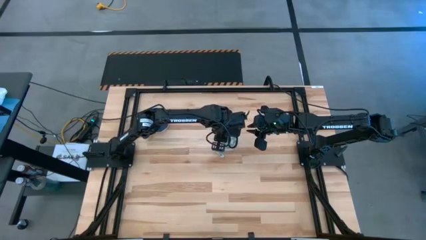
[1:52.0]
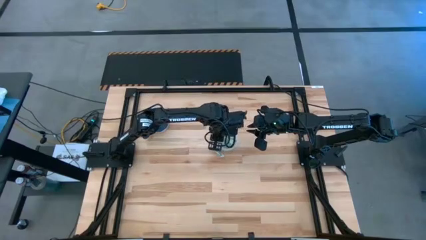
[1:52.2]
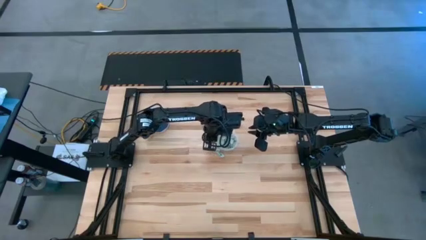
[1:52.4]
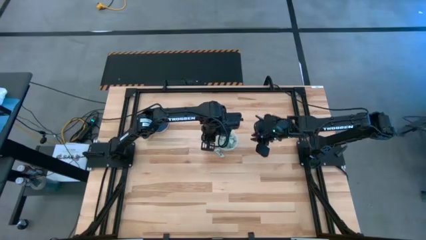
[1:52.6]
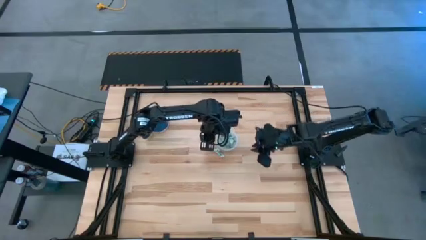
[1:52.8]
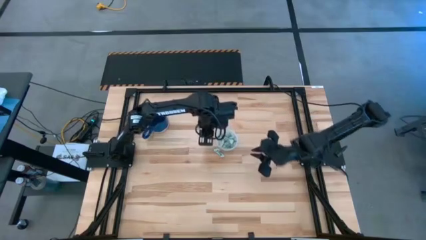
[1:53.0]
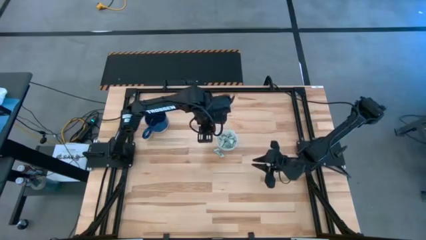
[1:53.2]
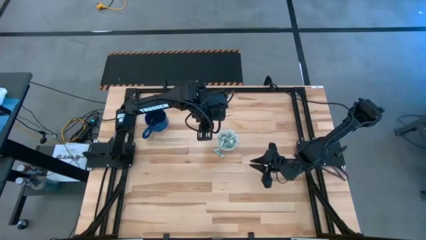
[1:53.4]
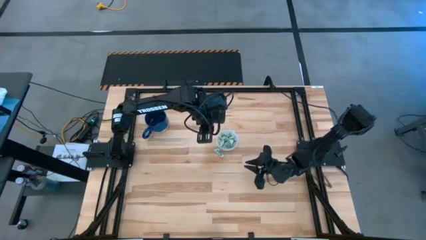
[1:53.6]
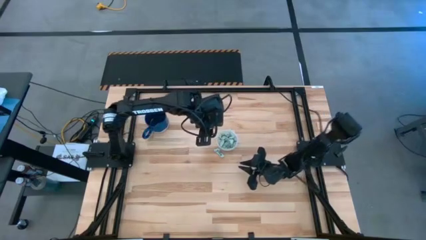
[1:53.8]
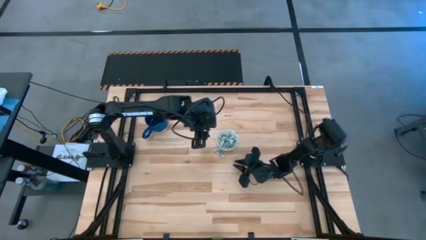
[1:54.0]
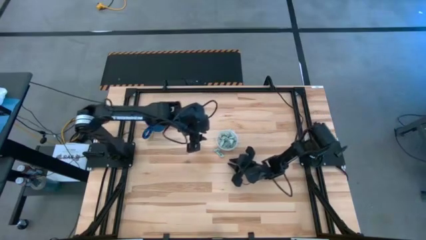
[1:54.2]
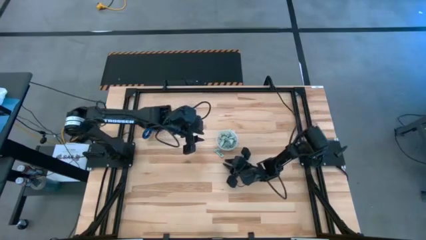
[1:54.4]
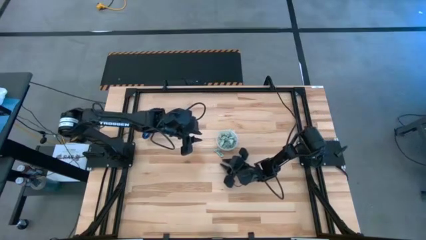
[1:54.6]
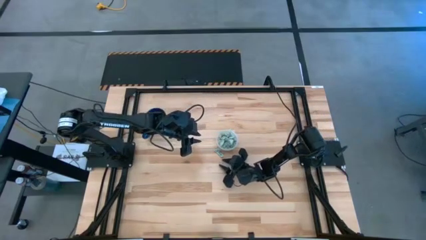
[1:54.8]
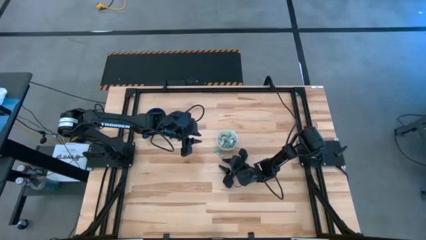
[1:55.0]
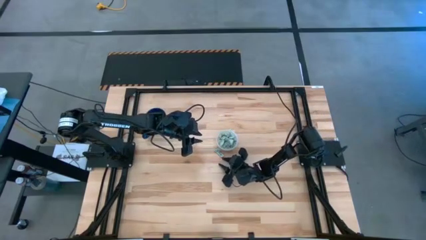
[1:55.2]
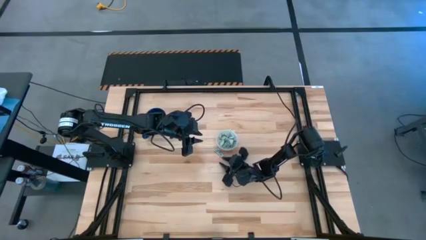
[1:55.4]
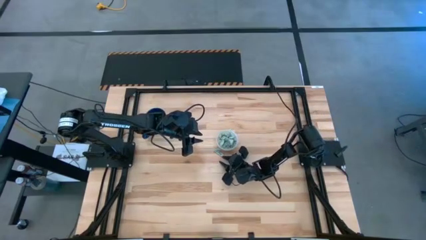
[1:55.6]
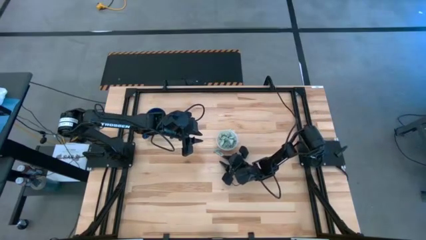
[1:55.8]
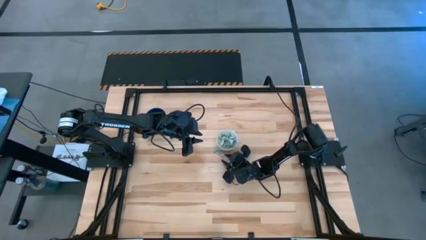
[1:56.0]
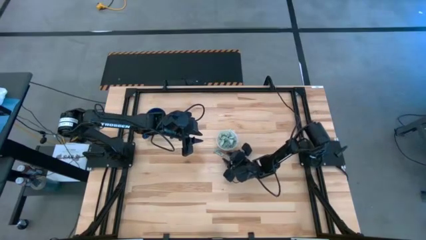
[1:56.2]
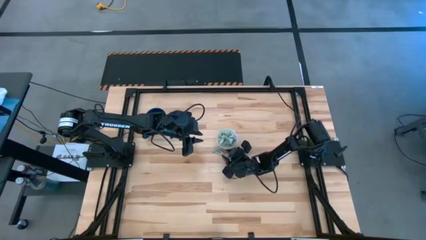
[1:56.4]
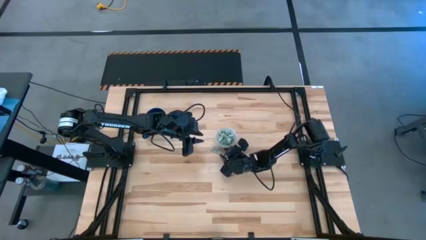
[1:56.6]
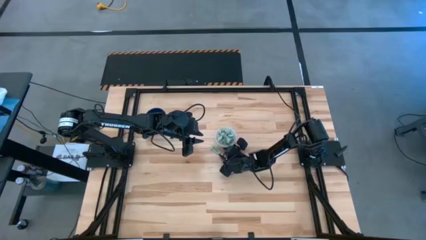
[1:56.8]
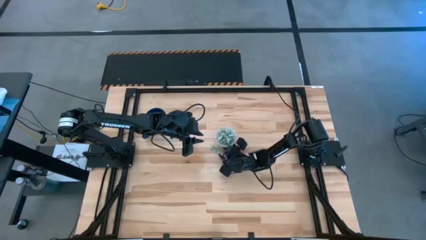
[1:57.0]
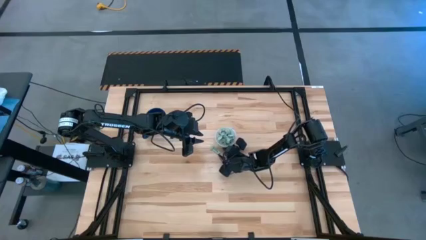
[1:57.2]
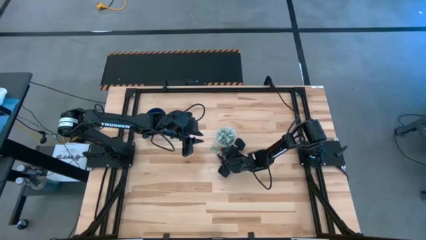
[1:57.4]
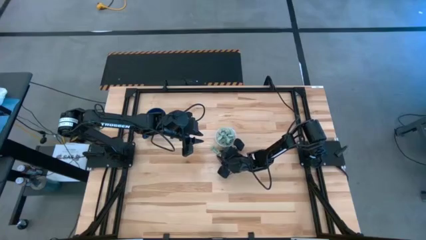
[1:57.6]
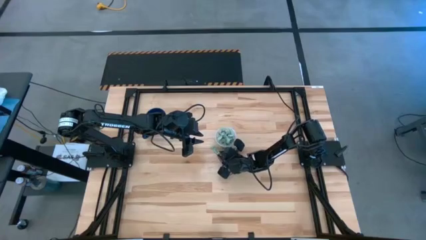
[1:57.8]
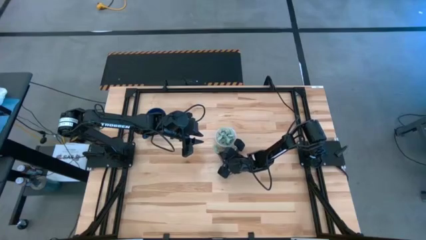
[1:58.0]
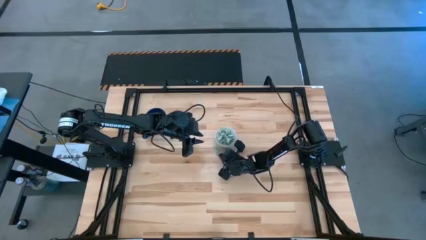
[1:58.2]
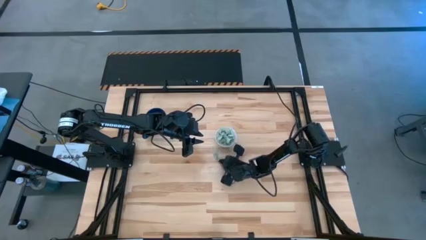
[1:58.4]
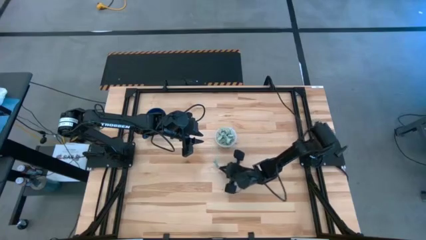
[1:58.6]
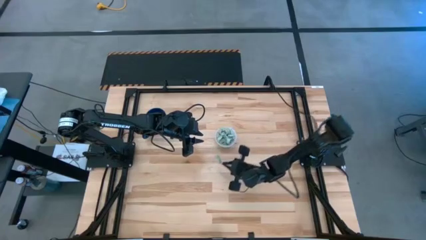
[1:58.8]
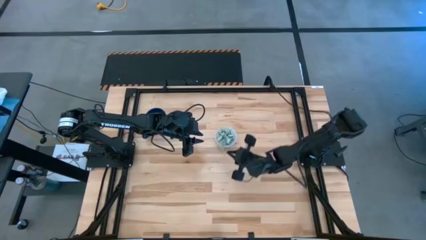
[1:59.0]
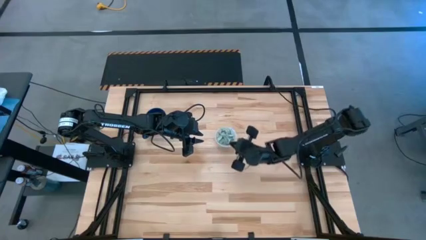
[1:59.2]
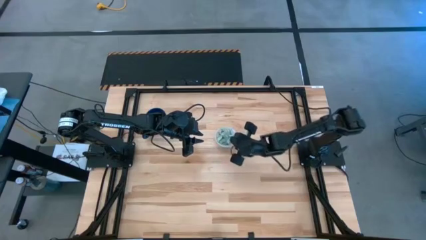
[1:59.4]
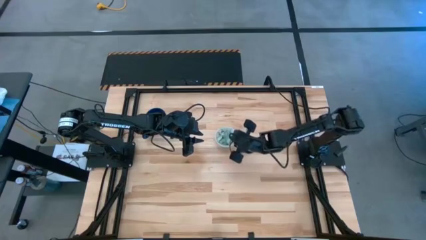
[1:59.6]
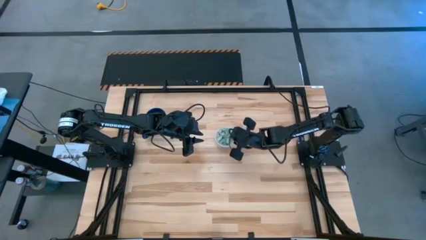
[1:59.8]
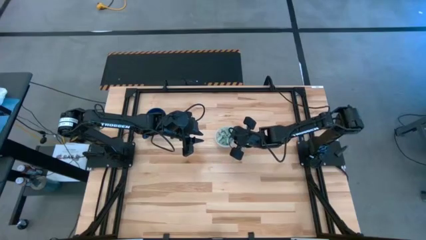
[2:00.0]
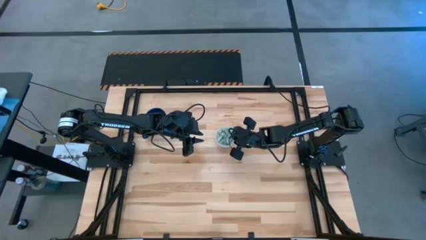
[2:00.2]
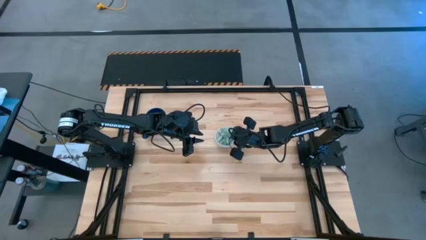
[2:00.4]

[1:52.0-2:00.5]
Task: Pick and place items into bin
Put the gray stevia packet into the transparent bin

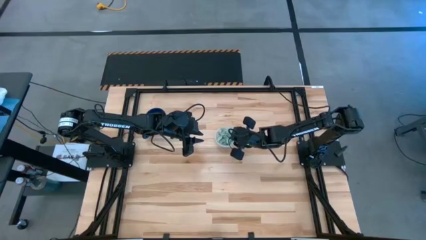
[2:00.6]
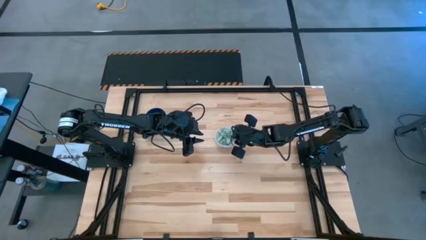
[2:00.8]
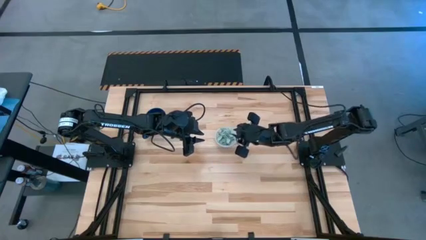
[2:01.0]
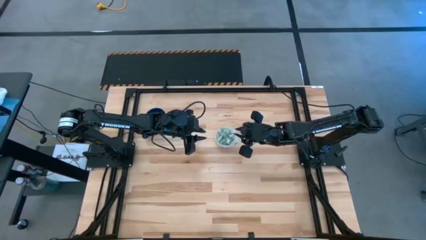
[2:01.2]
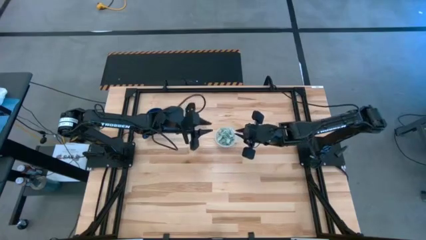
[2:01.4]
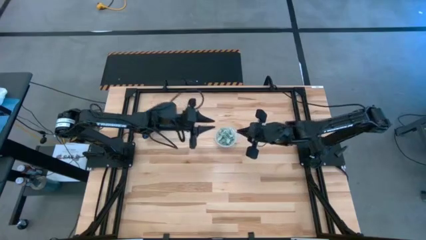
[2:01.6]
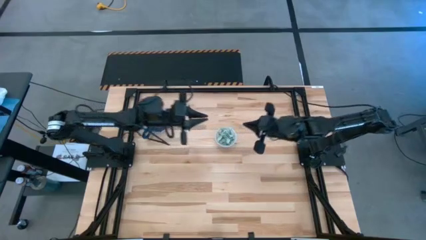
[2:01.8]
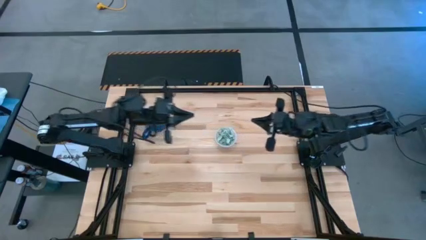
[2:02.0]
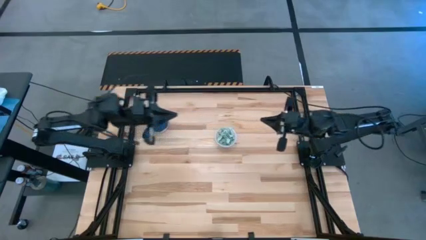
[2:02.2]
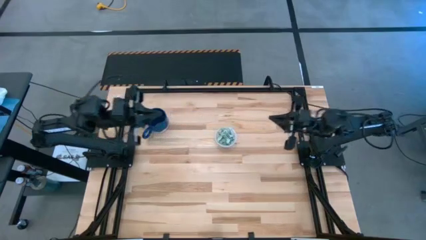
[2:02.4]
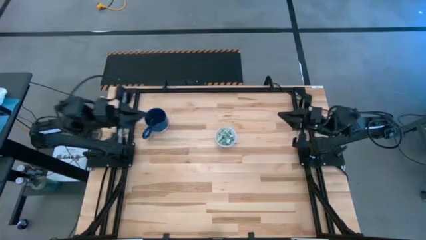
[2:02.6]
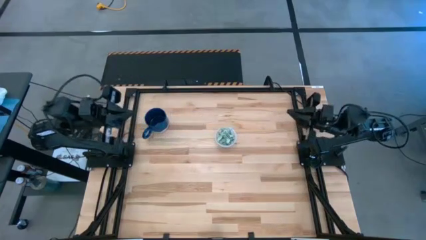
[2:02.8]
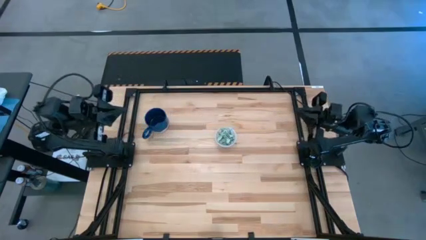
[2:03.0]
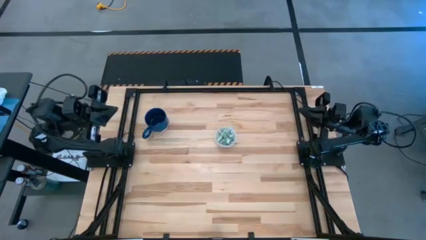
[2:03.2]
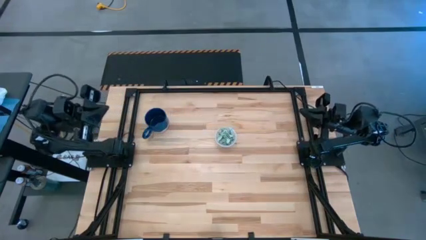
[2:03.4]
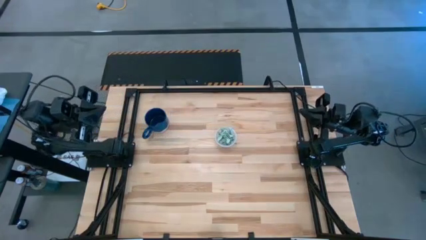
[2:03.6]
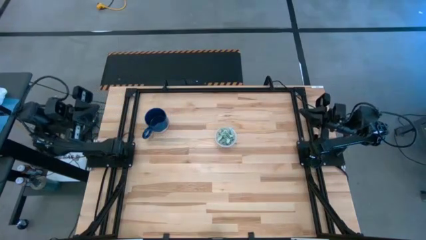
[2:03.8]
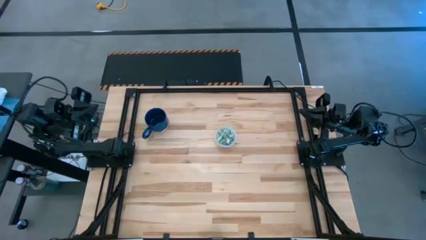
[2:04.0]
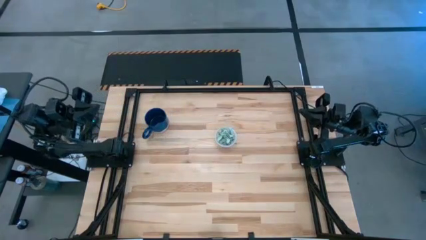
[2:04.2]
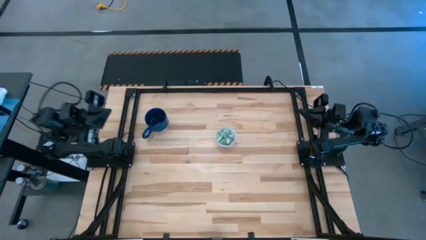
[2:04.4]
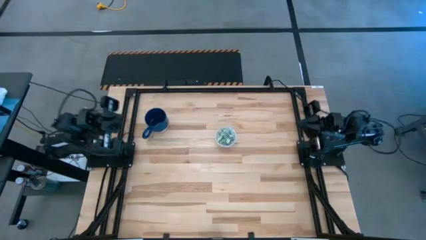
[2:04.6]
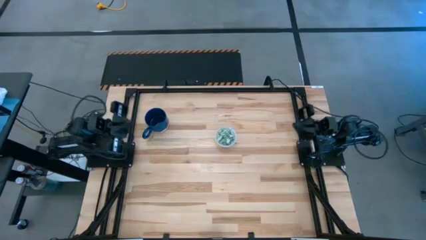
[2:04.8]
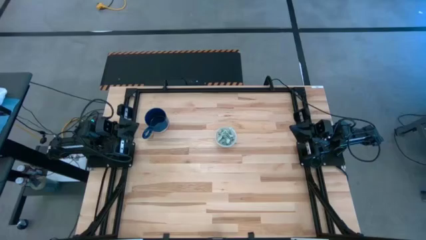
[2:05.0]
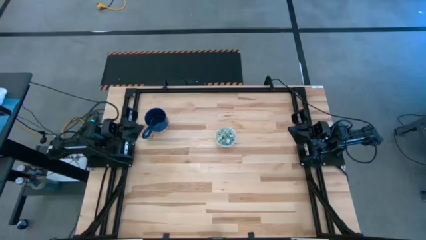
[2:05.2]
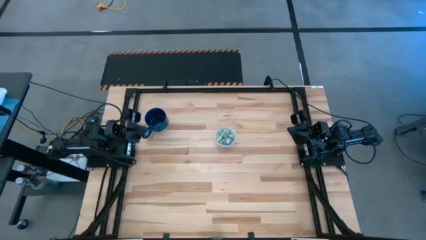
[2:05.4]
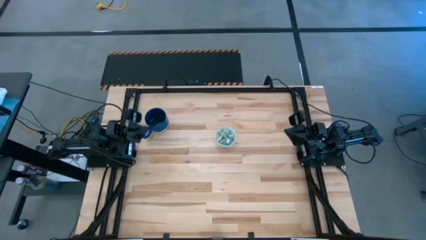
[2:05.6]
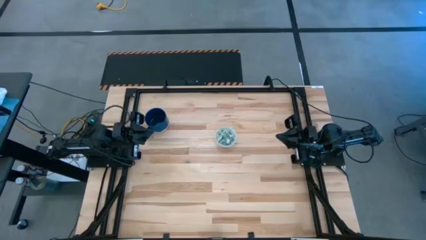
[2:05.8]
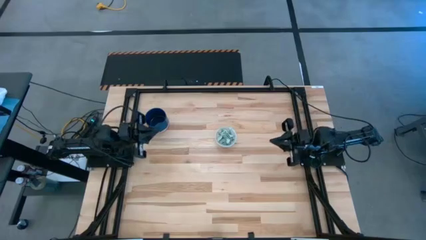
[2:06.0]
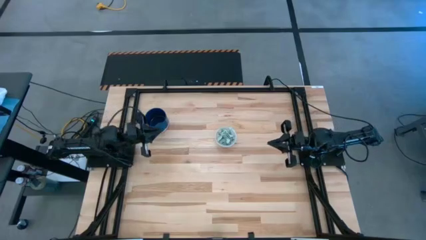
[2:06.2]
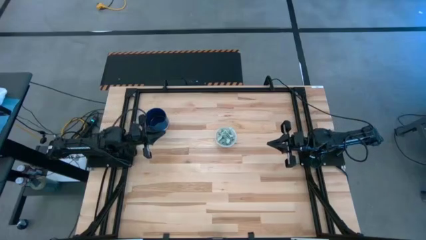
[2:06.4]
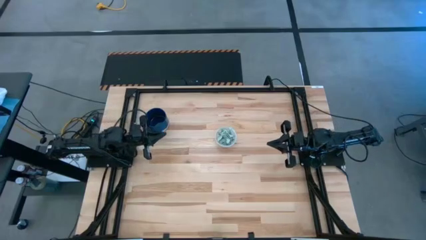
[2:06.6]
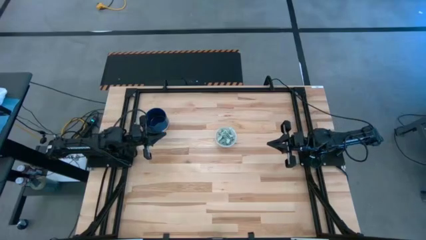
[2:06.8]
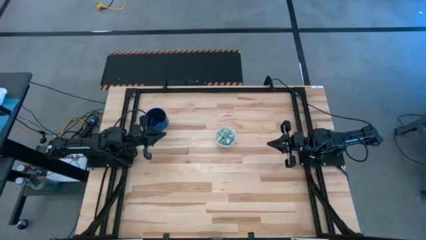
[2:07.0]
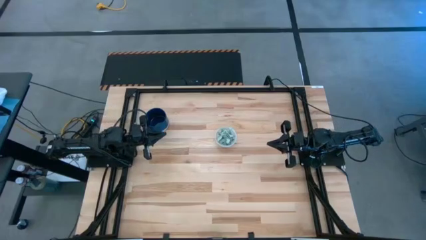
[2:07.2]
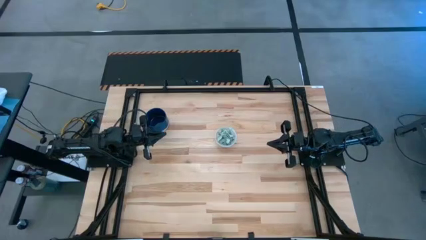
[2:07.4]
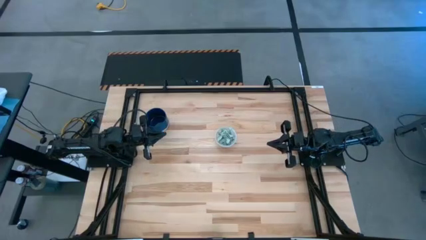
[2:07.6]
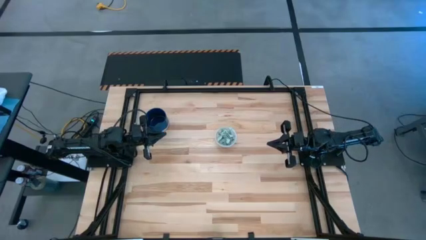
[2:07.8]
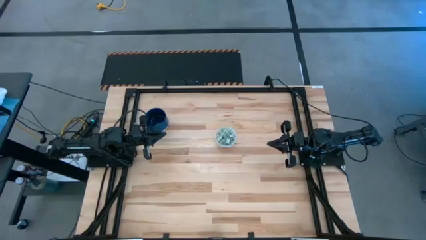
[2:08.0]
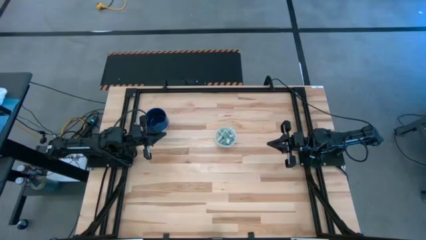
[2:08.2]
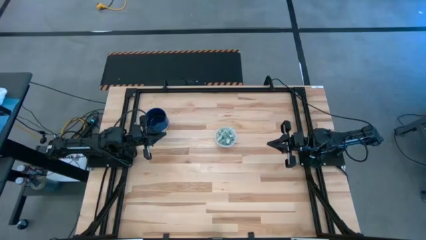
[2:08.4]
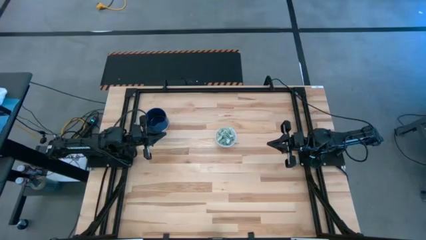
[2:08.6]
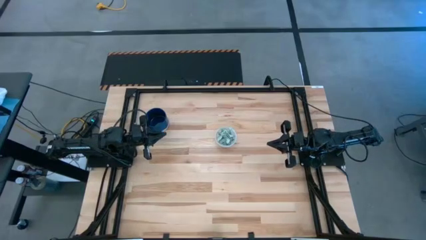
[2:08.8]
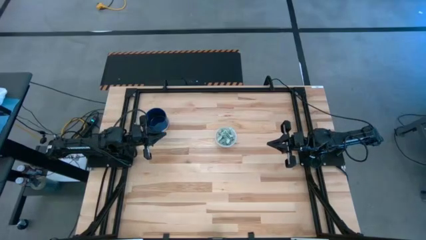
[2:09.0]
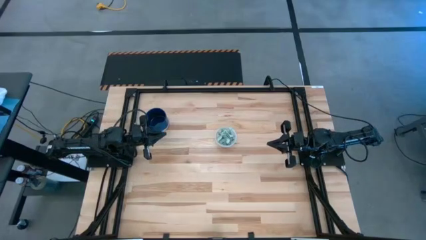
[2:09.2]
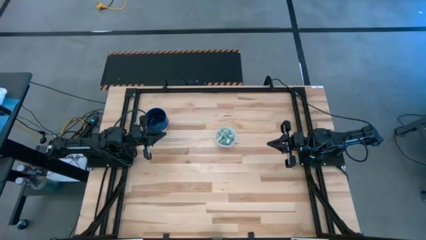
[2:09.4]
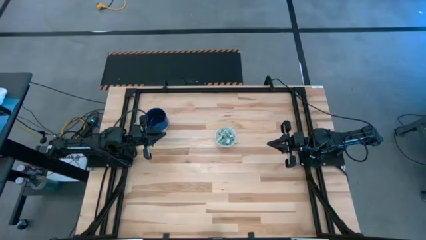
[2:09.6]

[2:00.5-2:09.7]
Return to Home Position
